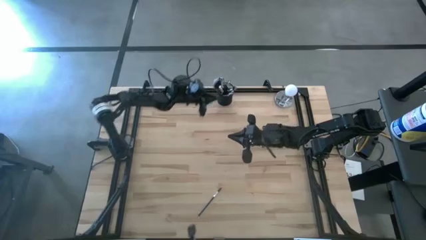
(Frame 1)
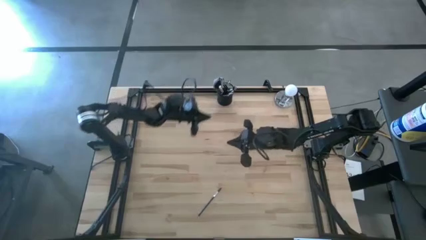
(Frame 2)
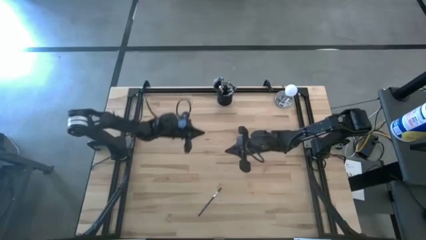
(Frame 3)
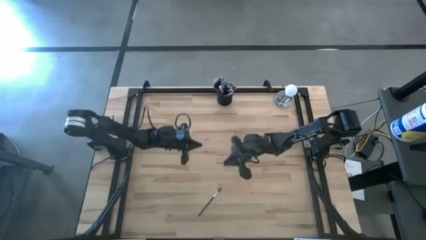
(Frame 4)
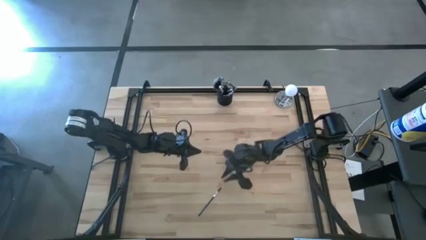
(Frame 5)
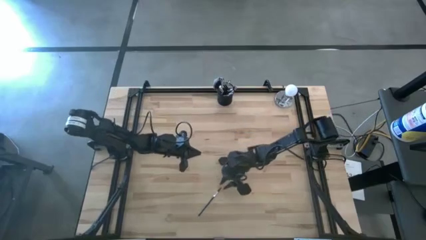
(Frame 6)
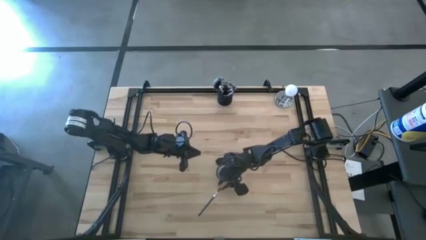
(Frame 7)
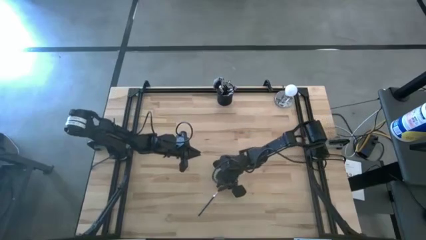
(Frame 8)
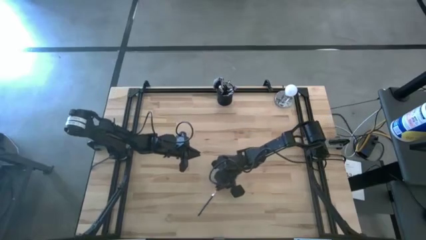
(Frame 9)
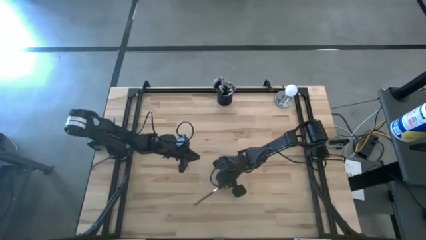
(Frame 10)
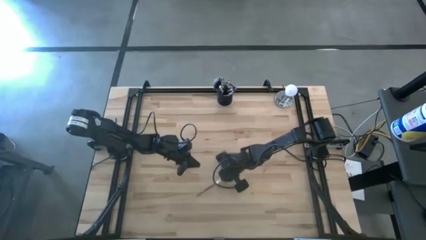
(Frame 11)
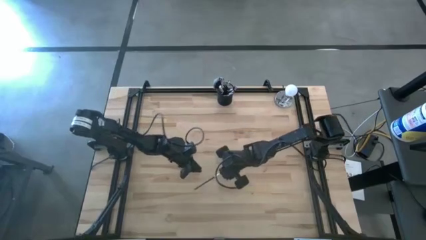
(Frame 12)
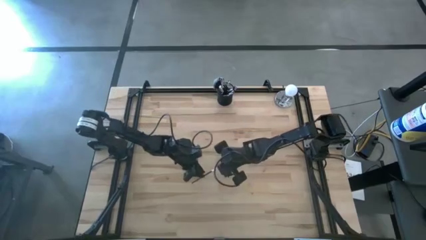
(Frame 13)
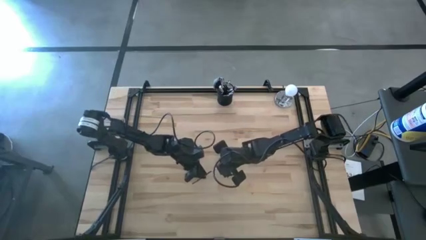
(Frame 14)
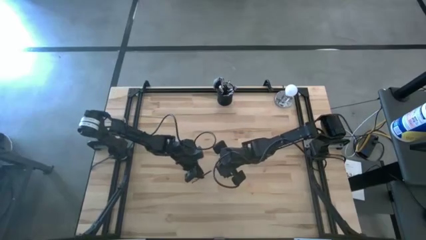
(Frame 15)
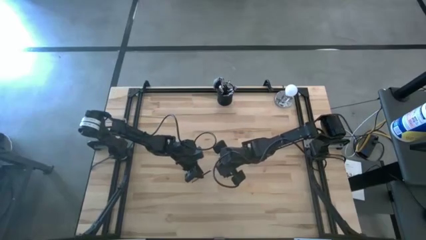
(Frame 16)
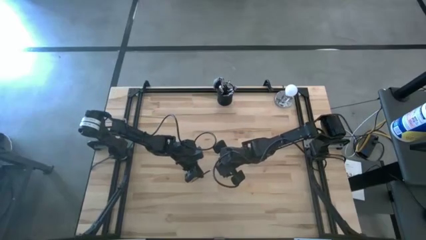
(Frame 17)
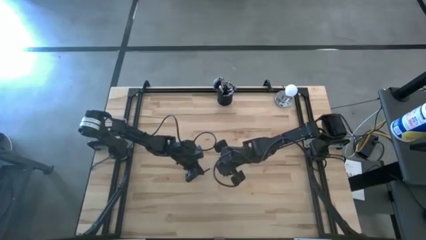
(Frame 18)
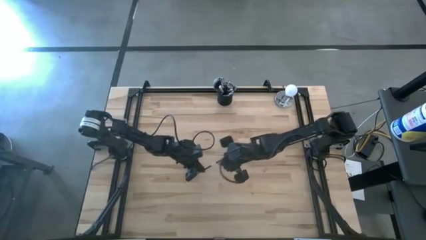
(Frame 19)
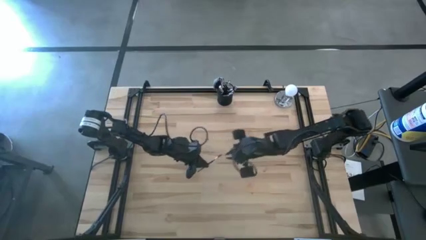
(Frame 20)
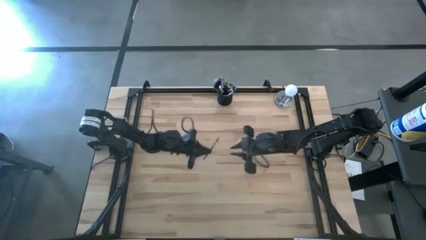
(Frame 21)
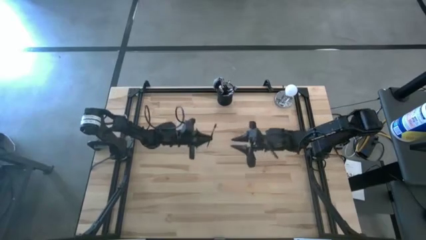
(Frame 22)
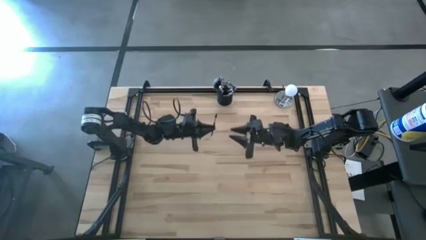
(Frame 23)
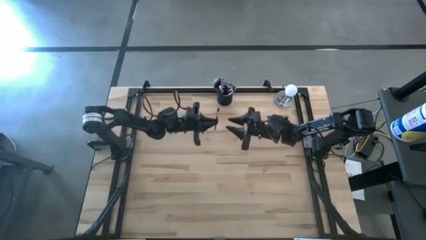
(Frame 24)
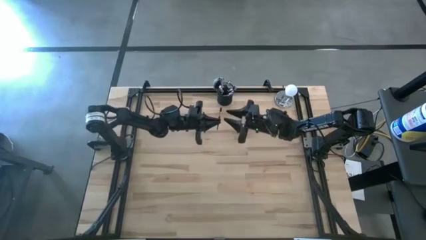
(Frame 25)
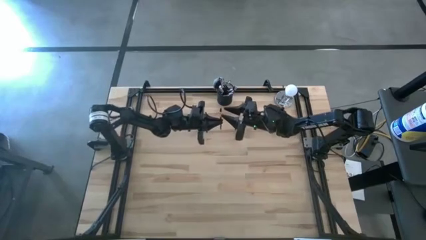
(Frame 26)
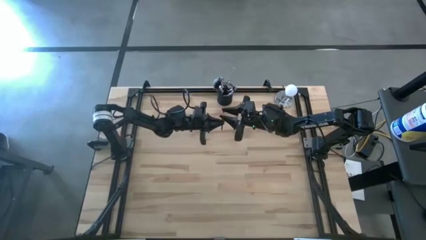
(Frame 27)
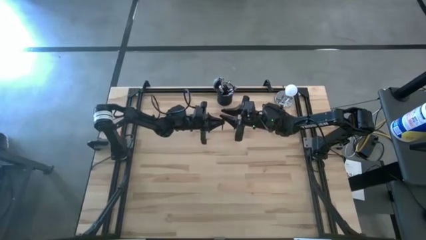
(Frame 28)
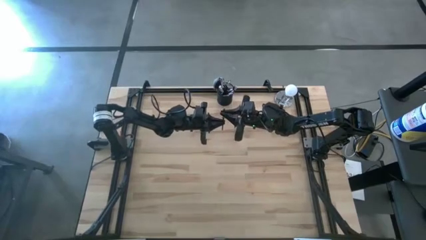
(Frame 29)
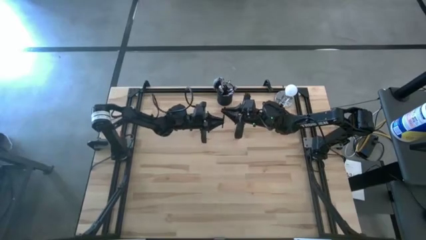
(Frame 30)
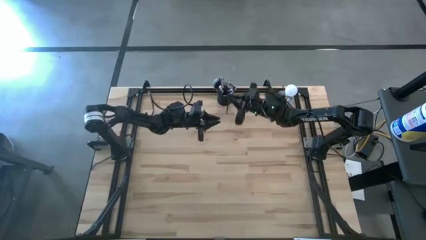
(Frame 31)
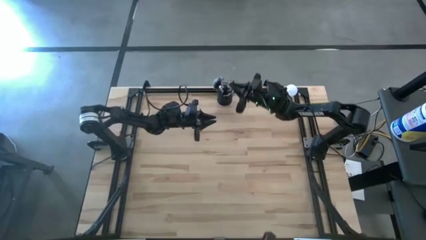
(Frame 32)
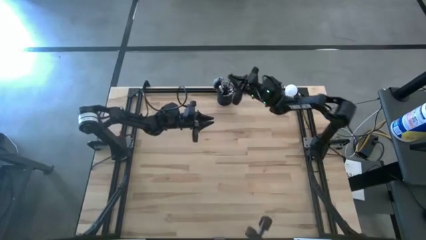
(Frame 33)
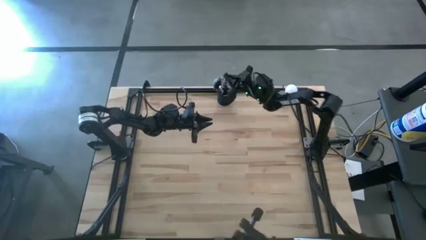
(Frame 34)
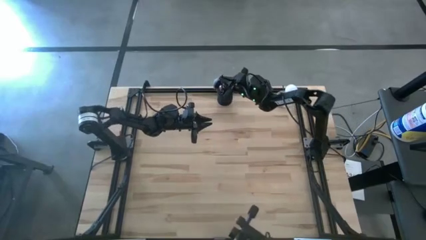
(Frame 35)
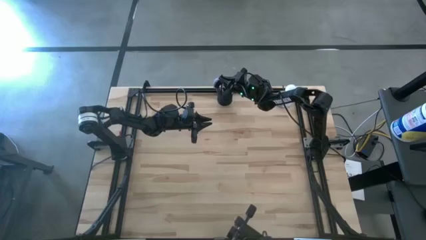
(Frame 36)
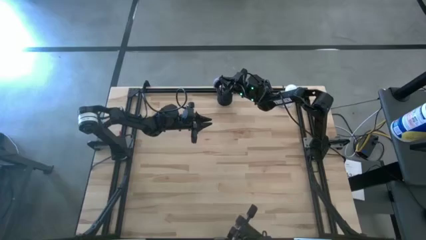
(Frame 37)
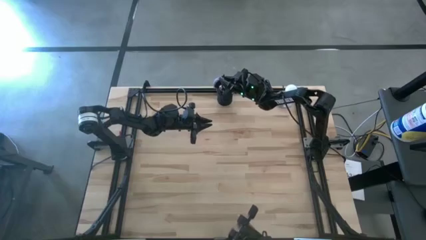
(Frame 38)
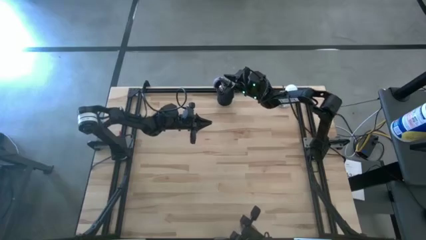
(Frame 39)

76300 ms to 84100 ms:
Task: Put items in baskets/containers
Put the black brow brush into the black pen holder

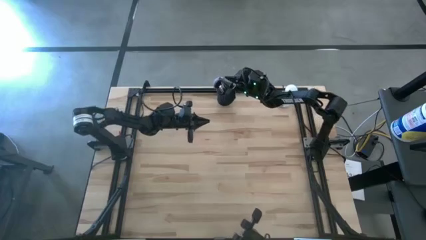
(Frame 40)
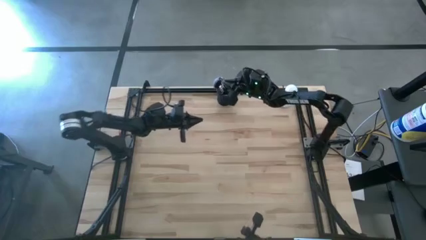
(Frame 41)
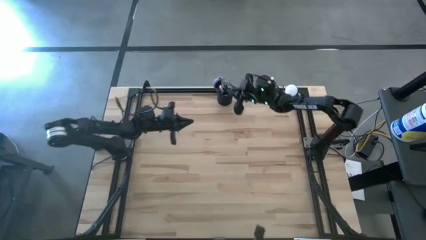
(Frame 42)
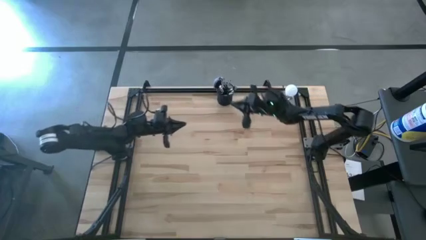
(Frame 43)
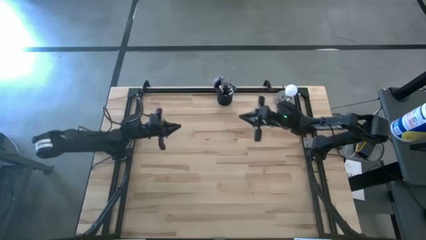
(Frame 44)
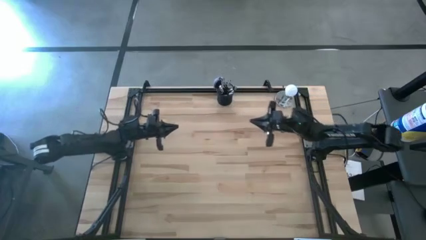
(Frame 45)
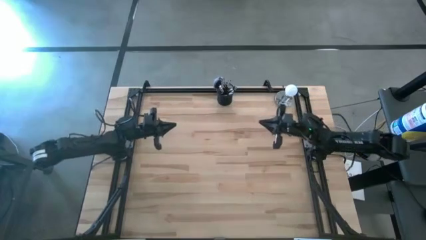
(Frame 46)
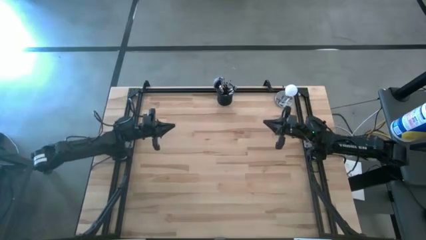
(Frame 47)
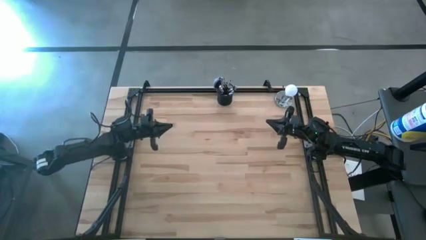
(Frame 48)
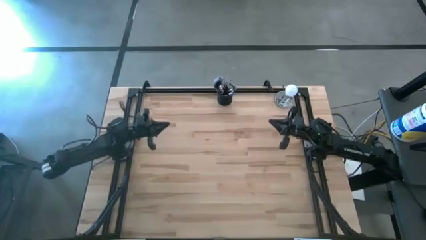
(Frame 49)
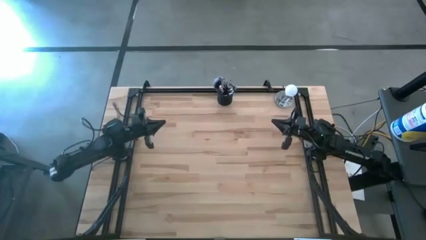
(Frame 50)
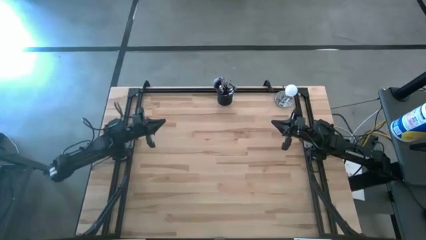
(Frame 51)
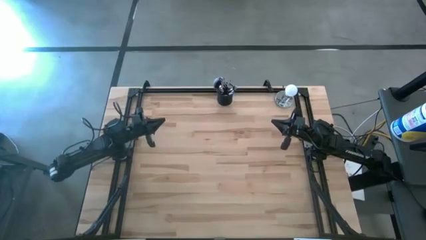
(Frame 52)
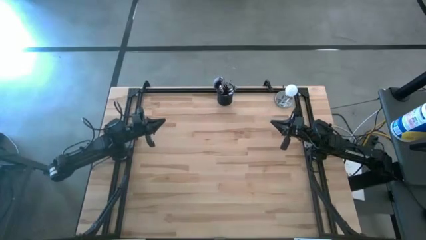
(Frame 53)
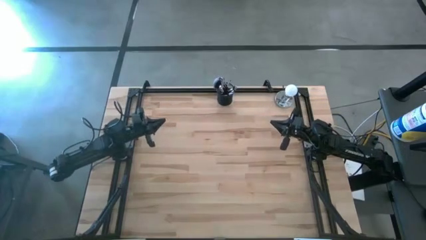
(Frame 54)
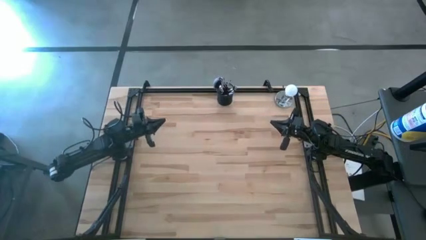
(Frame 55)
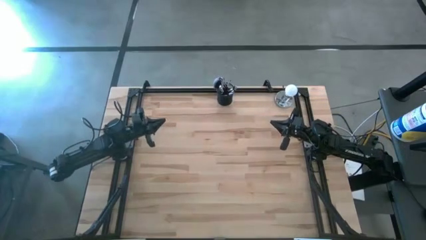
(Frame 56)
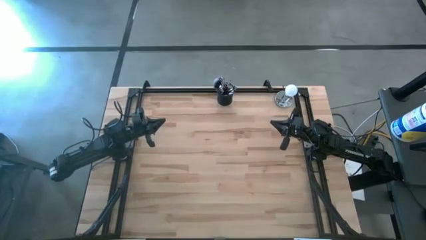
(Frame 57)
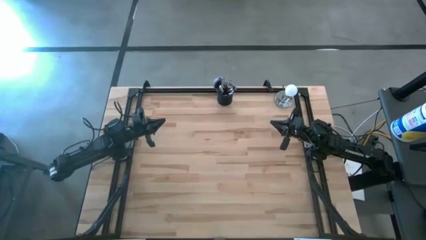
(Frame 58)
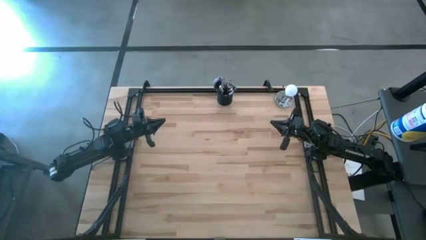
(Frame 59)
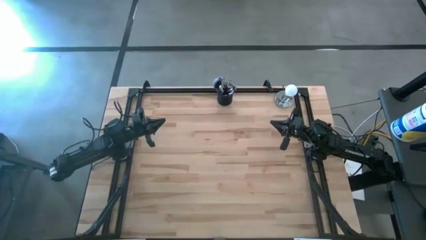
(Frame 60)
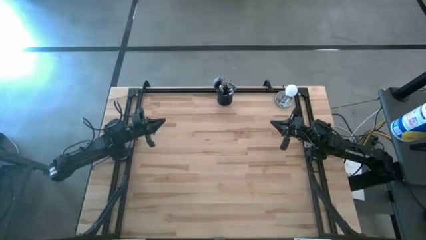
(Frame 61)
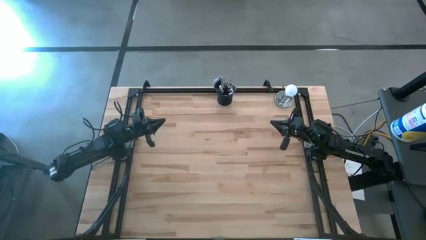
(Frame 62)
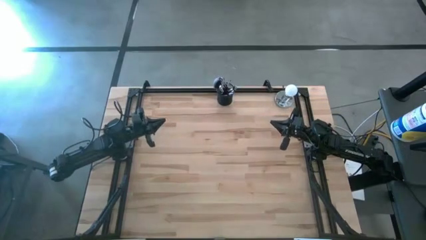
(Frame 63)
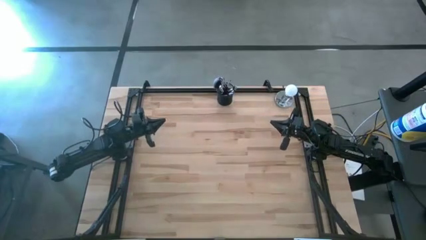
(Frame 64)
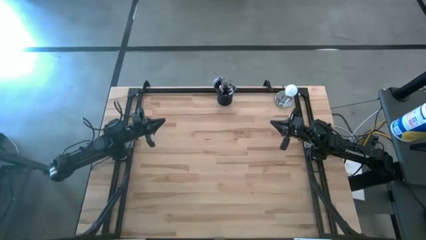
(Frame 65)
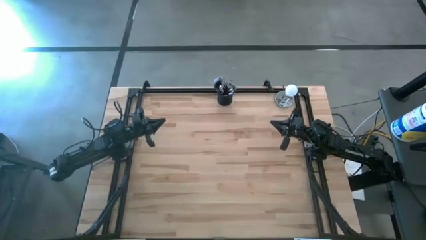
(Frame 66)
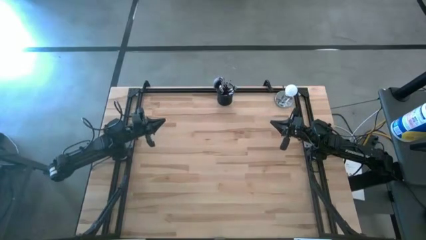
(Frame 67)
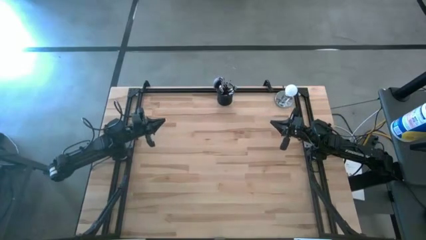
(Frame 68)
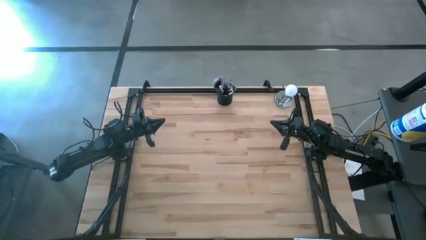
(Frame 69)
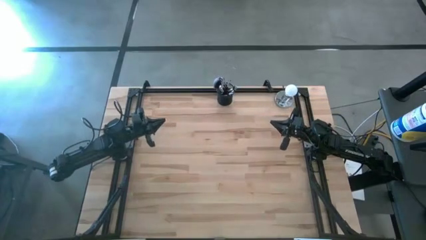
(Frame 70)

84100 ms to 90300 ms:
Return to Home Position

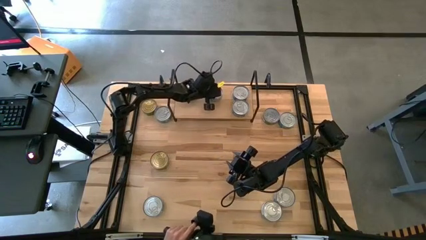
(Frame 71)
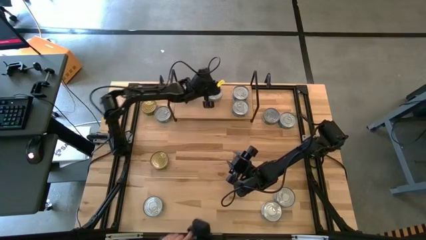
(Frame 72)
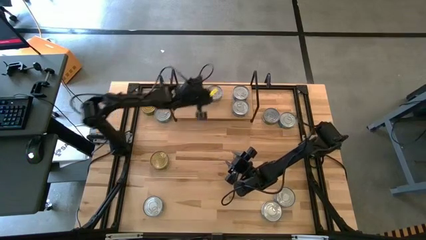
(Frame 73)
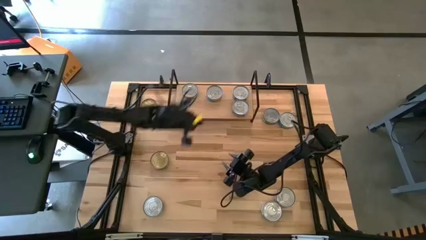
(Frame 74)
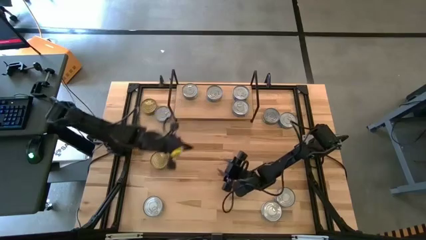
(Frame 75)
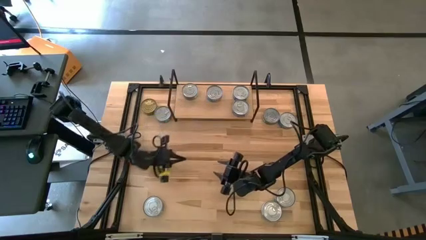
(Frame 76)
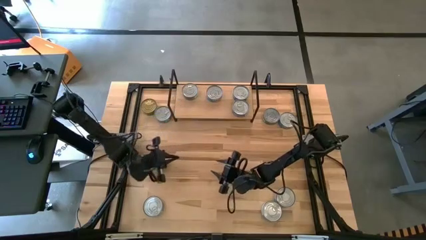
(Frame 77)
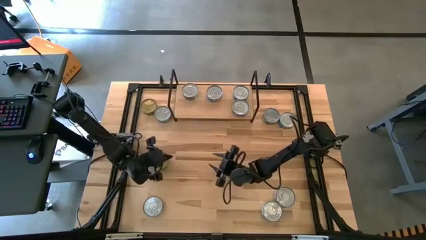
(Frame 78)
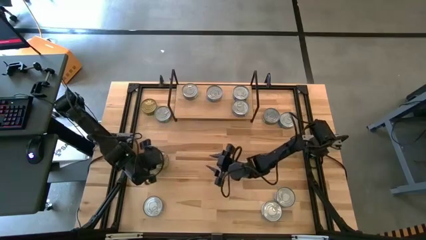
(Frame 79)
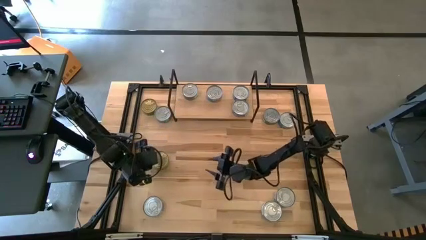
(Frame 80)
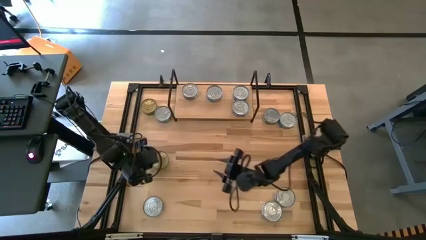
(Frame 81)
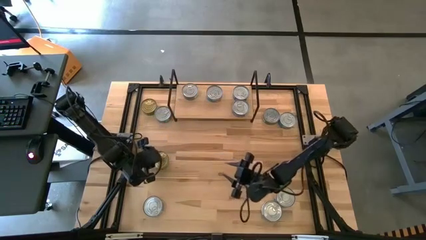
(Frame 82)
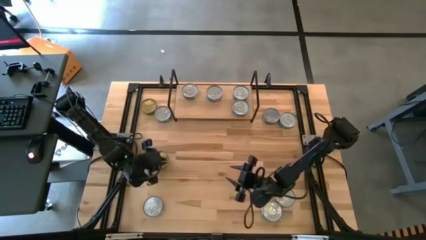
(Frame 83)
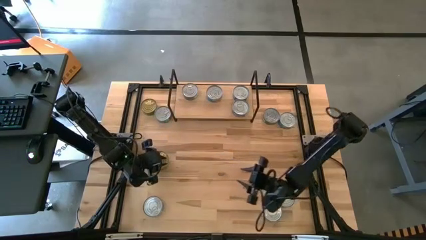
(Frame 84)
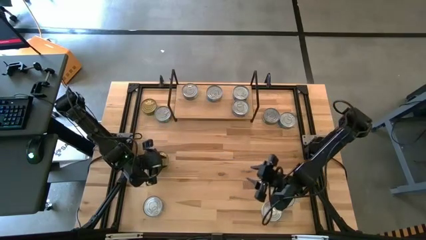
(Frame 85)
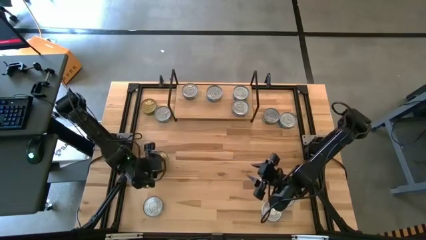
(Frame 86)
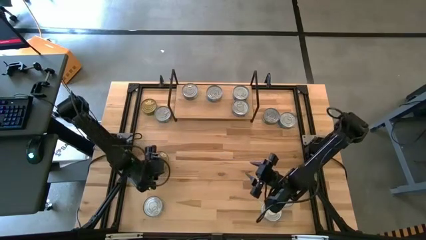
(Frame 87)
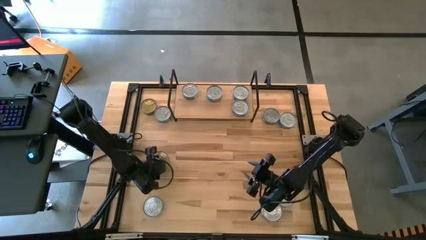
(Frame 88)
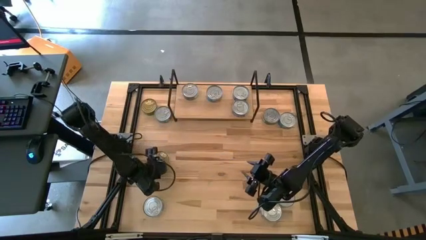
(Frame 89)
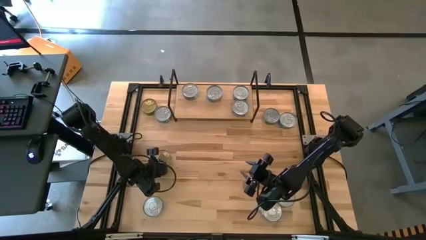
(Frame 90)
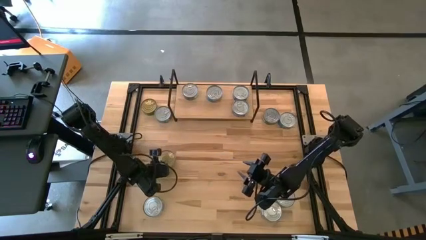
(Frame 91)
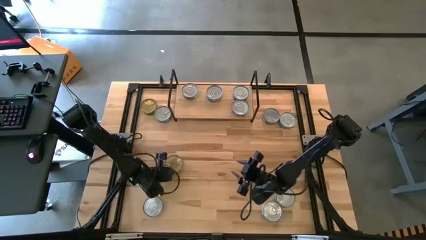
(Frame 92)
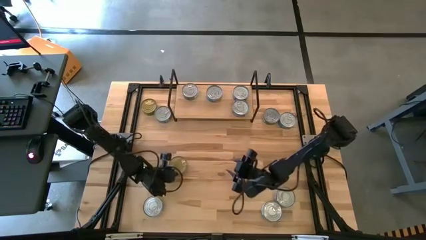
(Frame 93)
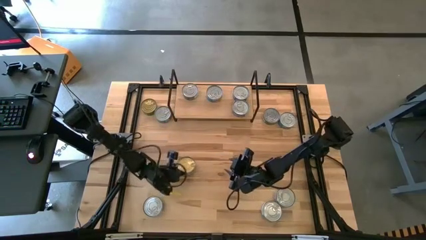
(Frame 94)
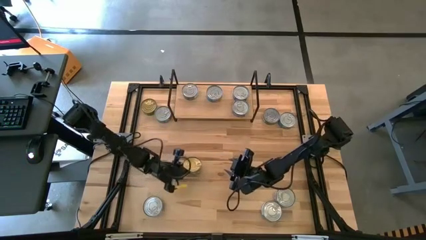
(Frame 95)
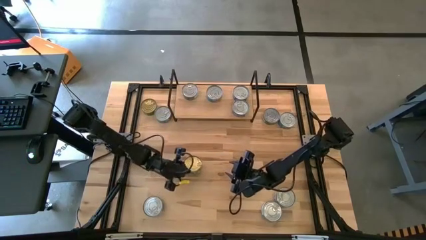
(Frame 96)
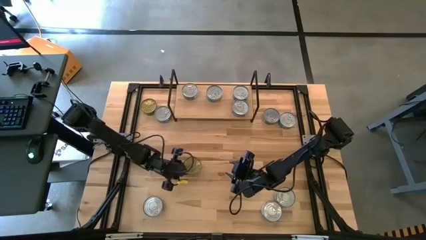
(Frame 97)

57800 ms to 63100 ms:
Task: Stack canned seafood by type on shelf
Move the green tuna can to the middle of the table
